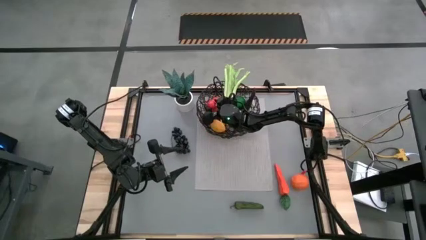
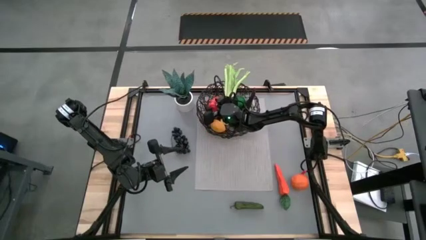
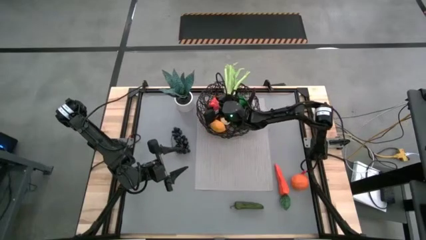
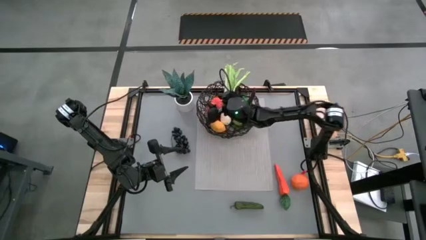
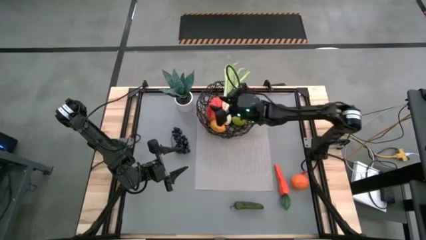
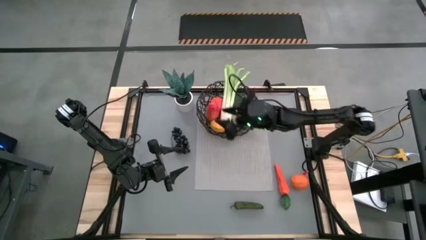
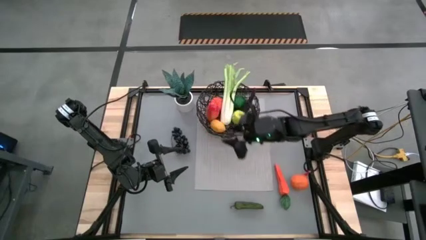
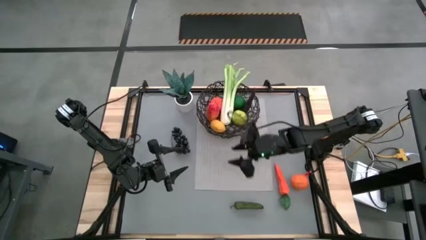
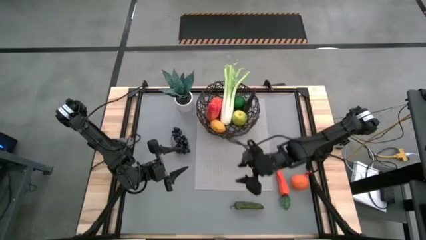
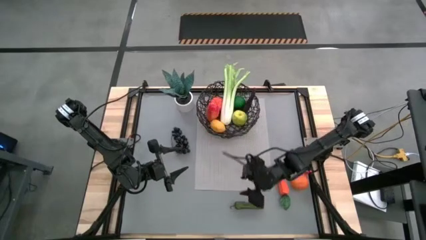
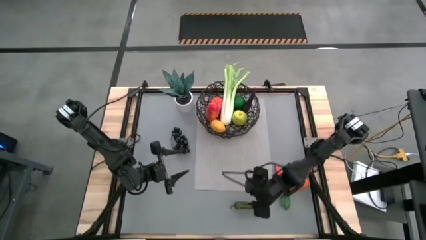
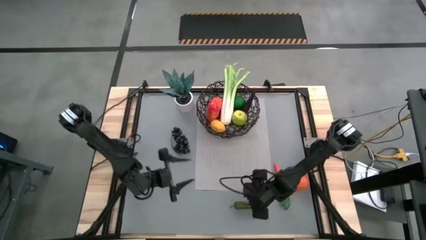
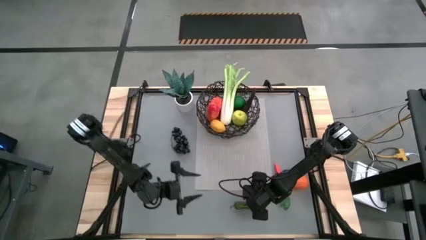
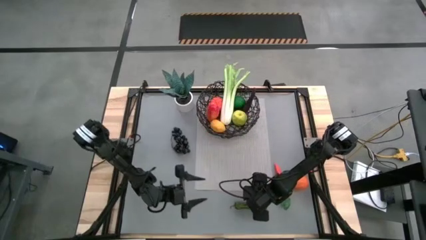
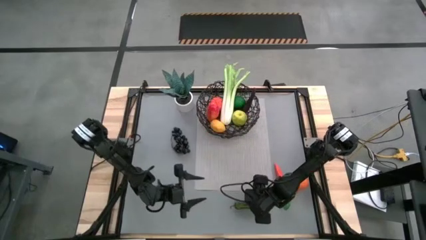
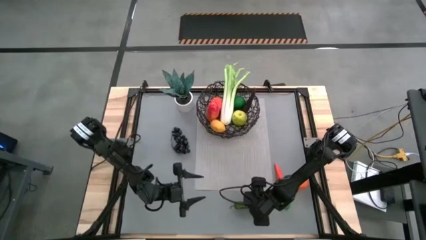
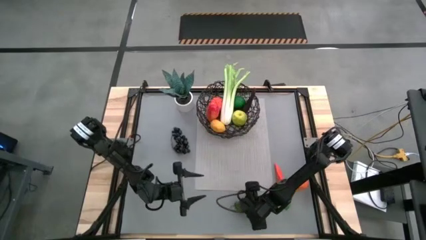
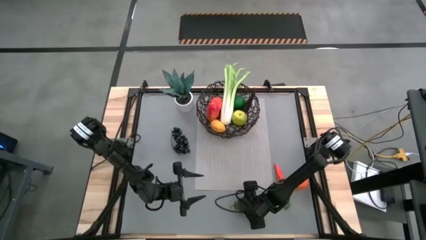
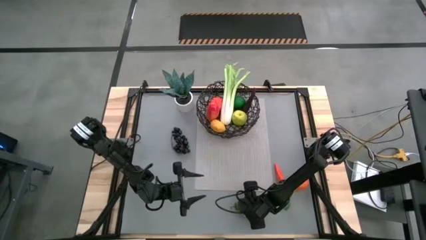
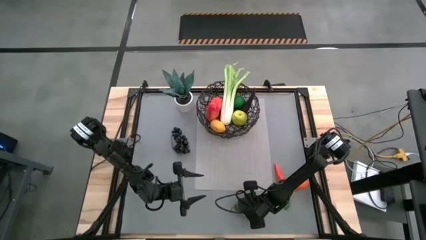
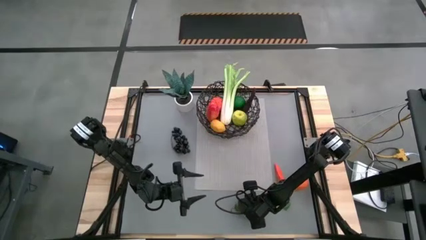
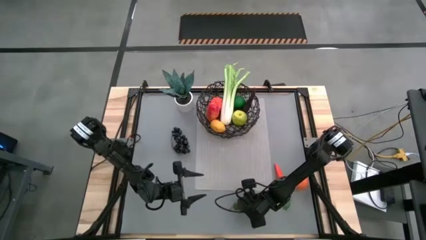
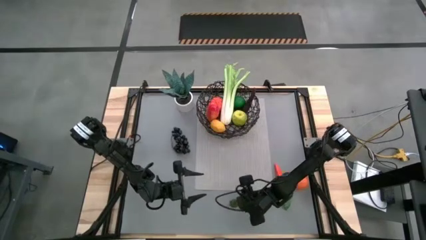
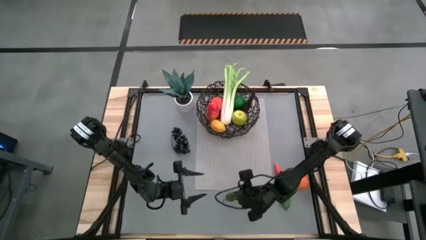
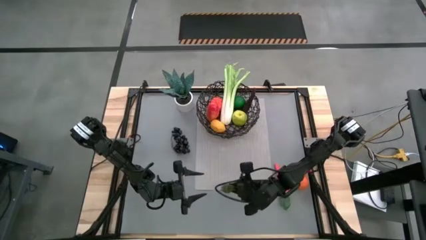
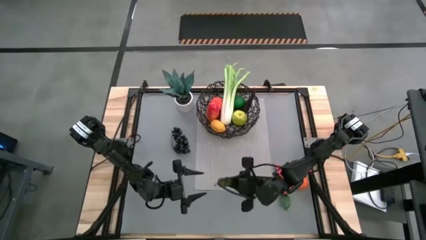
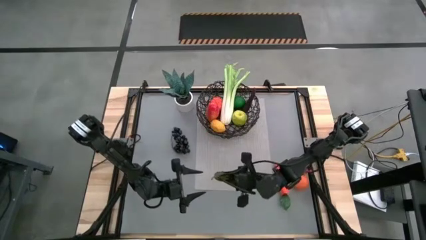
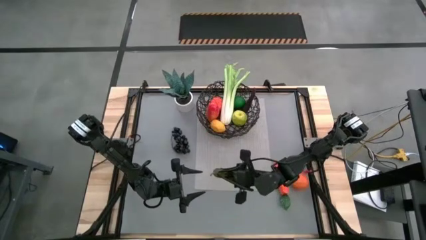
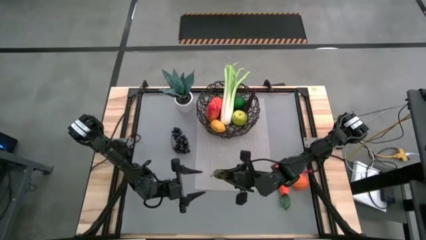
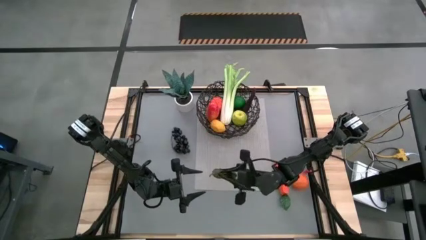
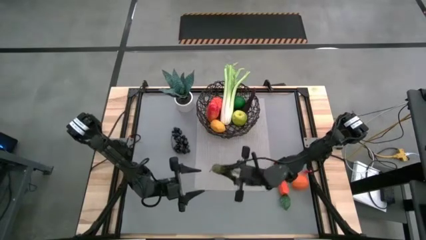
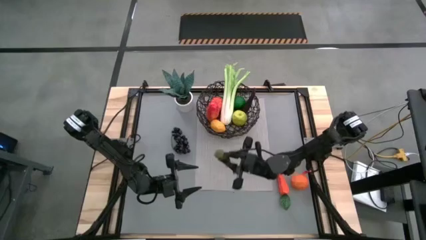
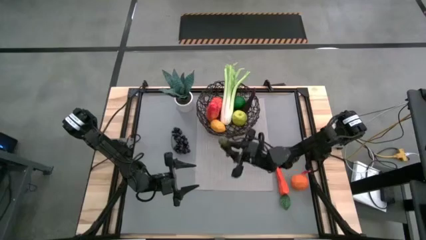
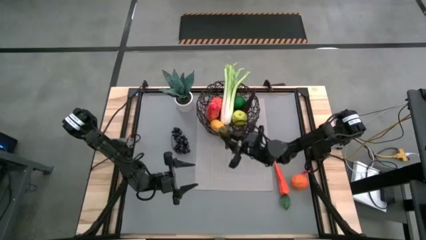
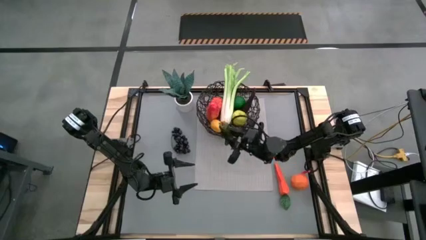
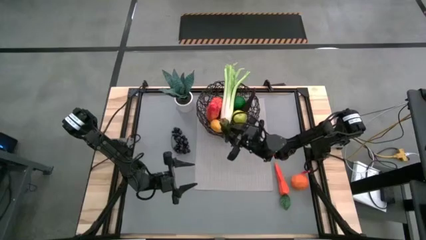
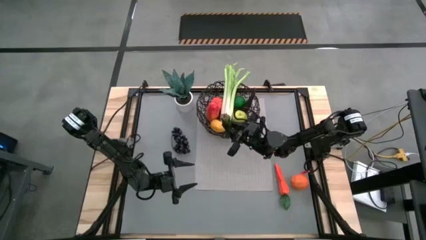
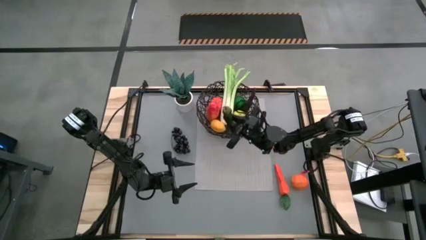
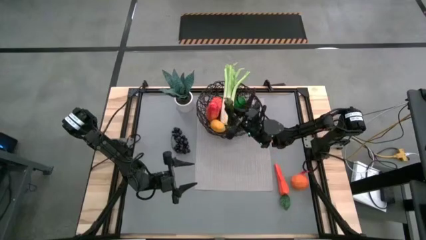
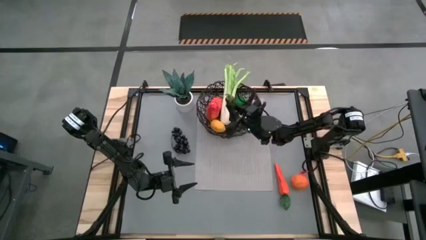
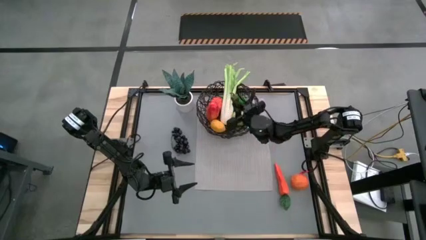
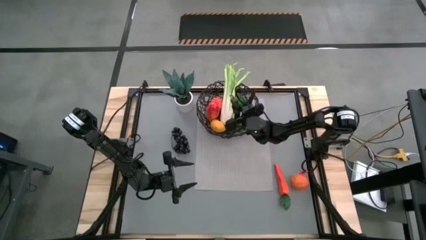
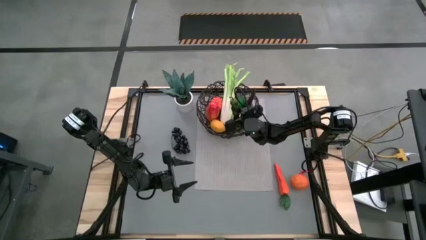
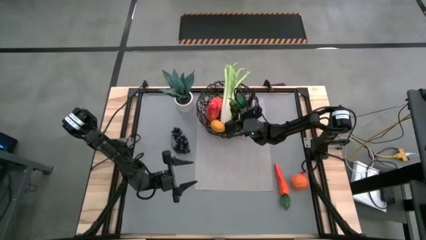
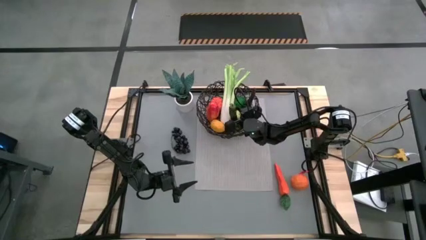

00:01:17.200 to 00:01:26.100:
Task: Build produce basket
Put the green chili pepper into the black wire basket

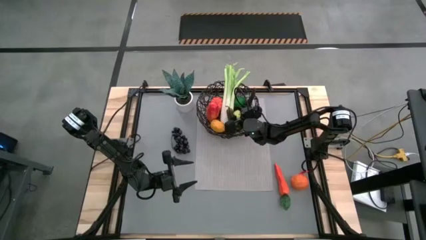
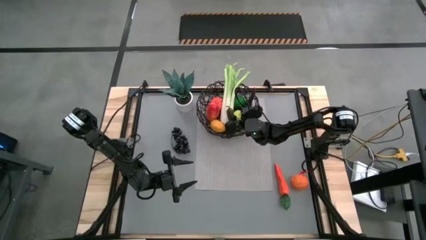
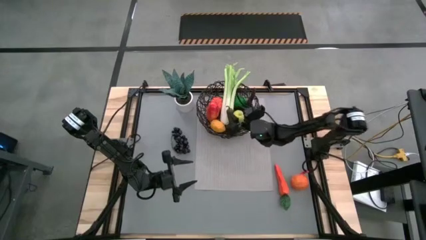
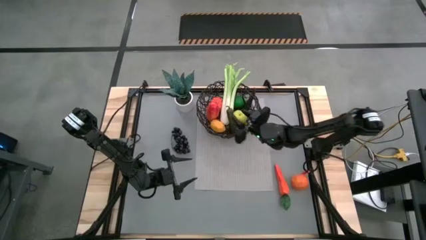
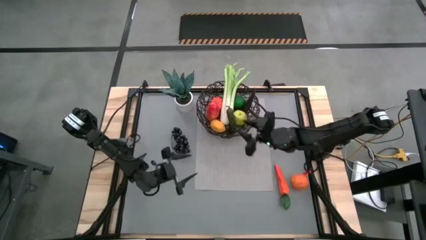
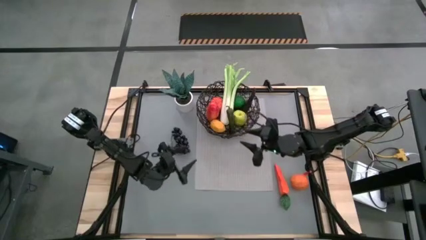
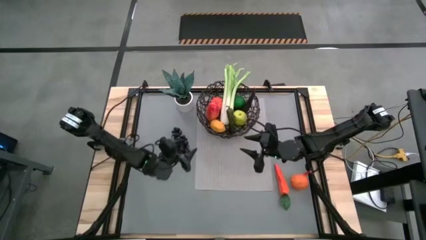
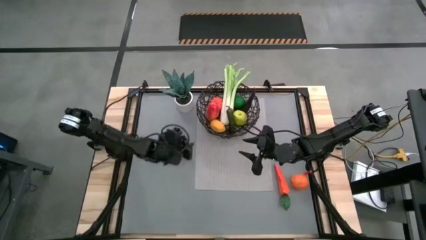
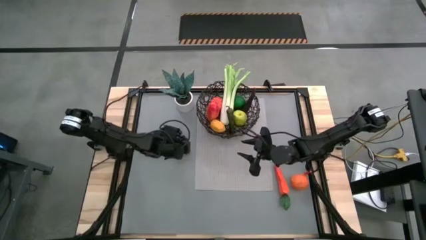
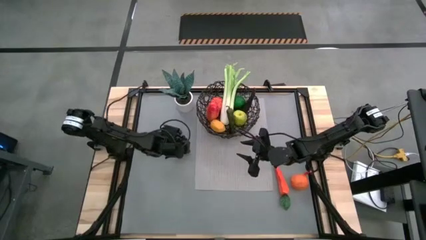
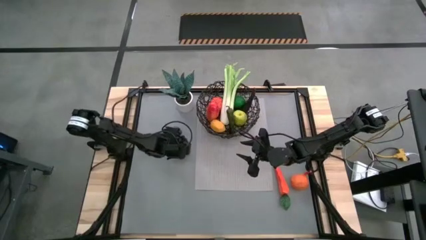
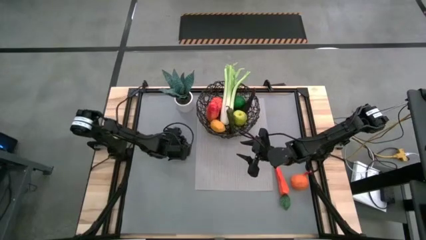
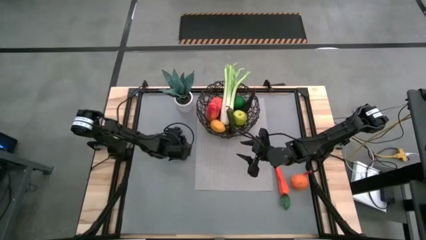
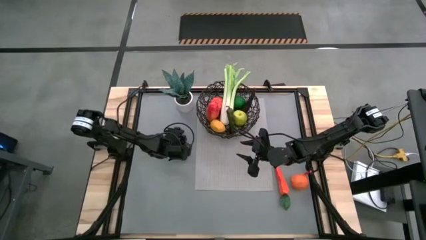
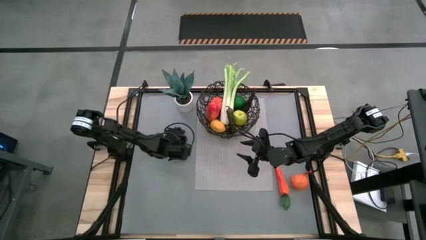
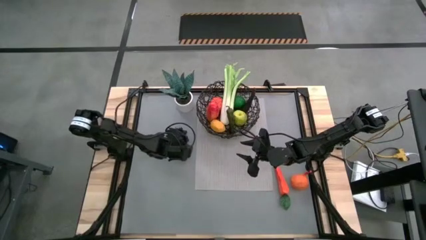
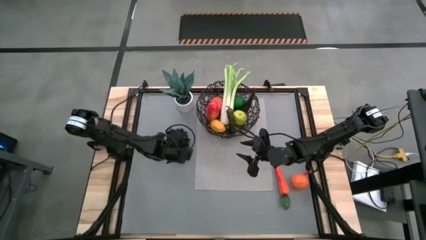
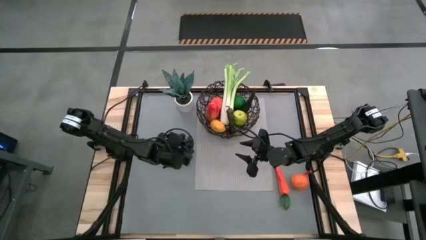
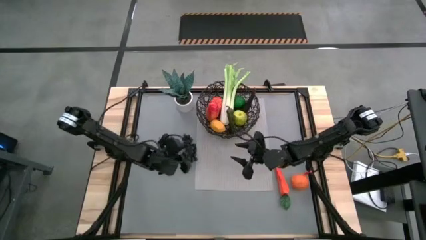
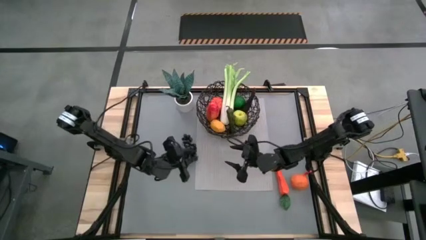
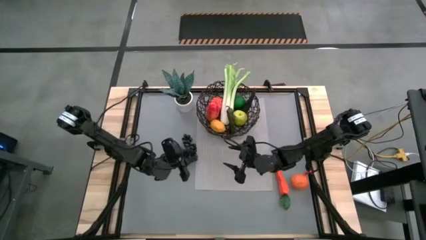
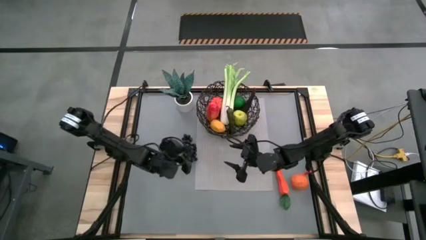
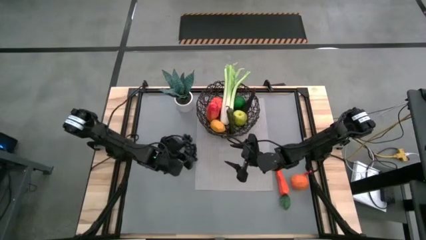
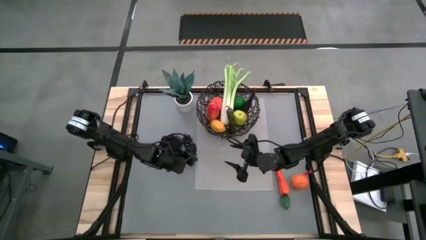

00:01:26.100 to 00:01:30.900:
Put the dark purple grapes into the black wire basket

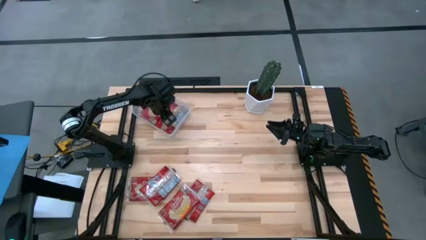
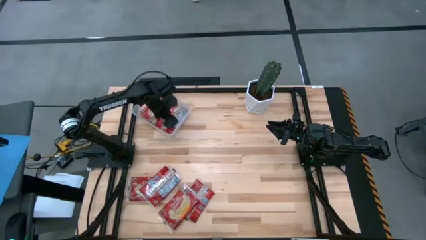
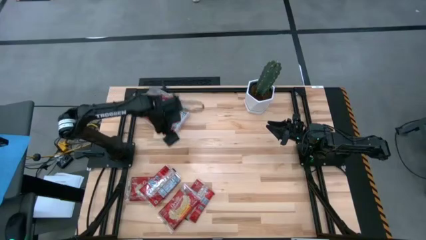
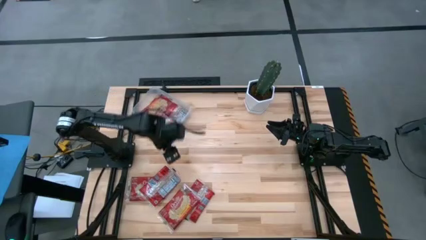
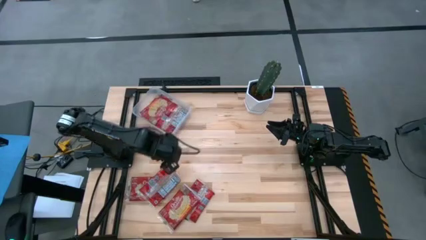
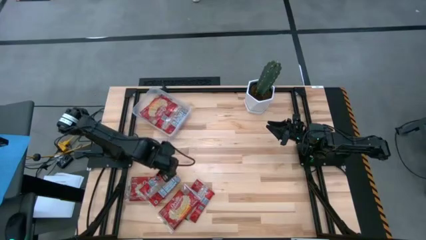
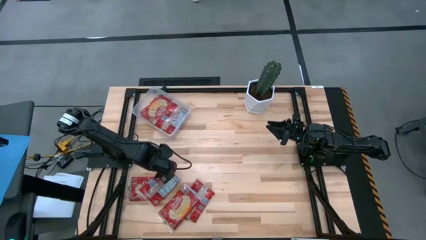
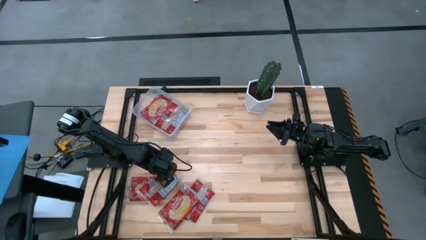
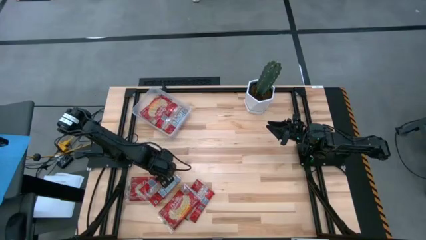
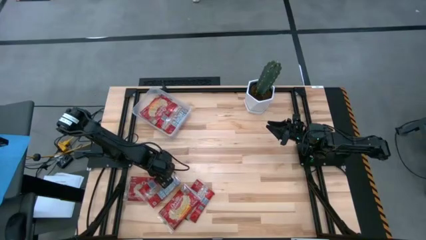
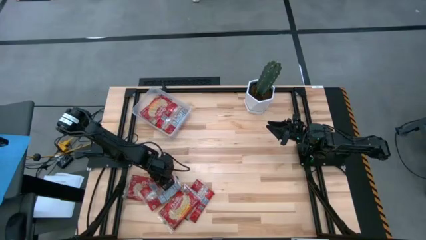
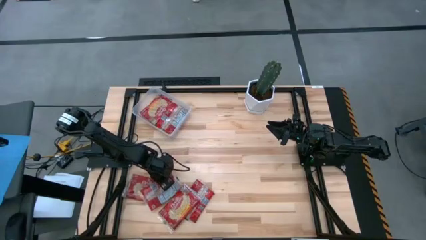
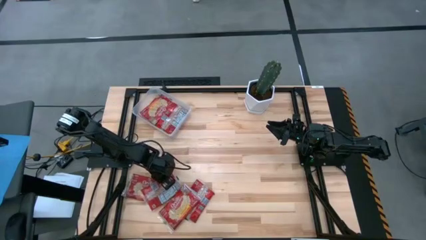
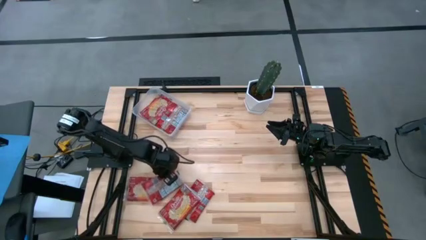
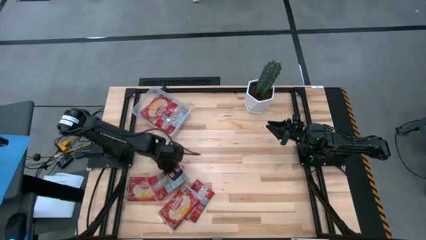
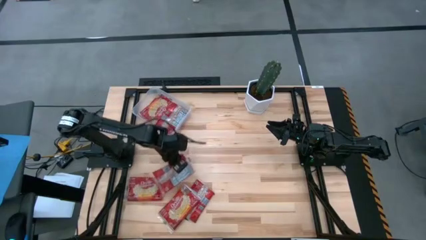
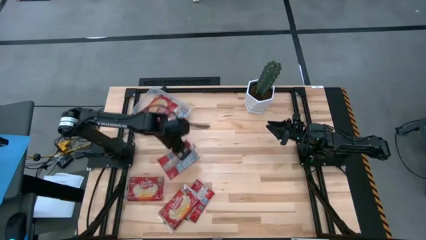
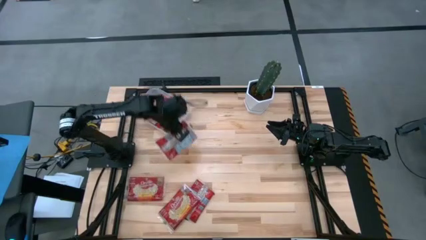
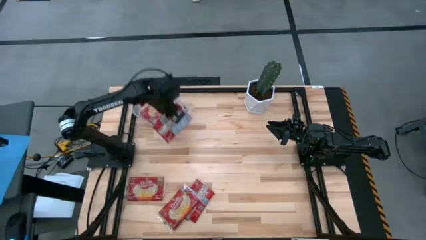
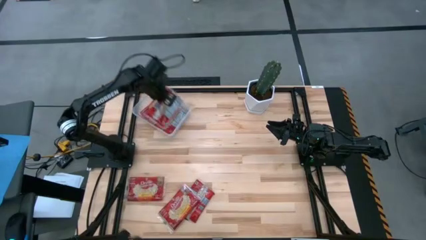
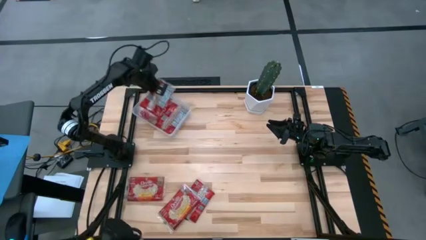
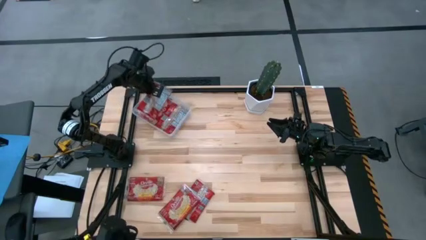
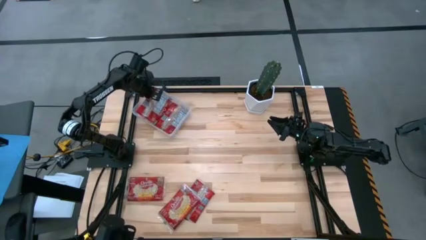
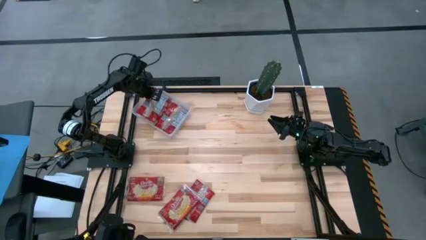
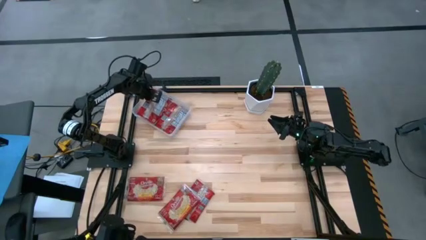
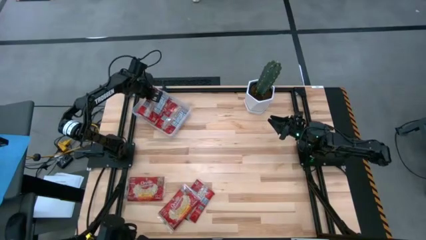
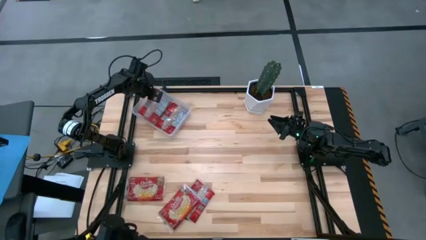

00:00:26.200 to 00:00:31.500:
Task: Sort popcorn bags into baskets
Put the red popcorn bag into the transparent bin
